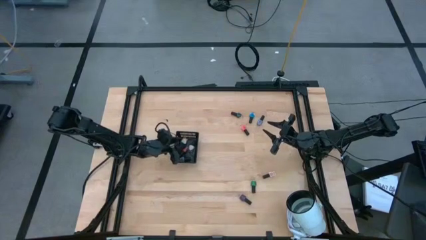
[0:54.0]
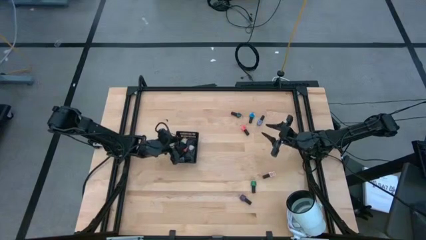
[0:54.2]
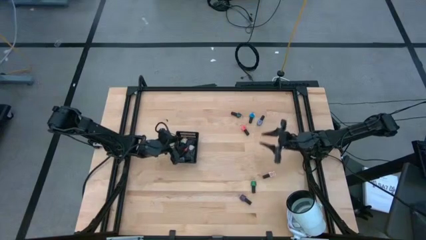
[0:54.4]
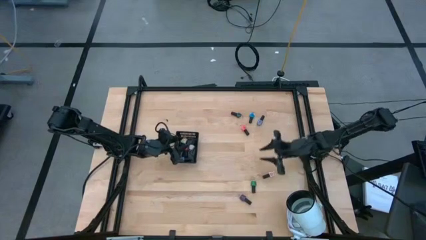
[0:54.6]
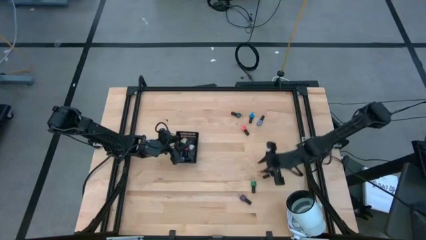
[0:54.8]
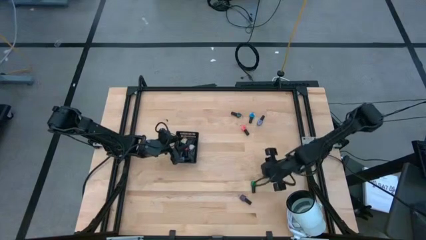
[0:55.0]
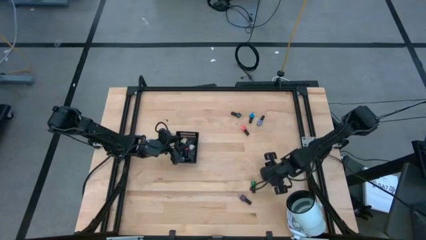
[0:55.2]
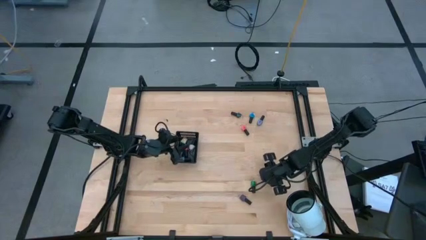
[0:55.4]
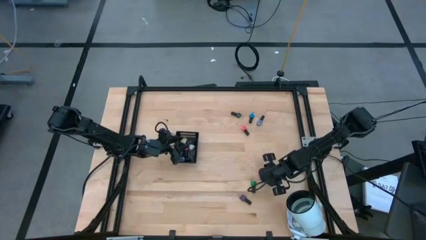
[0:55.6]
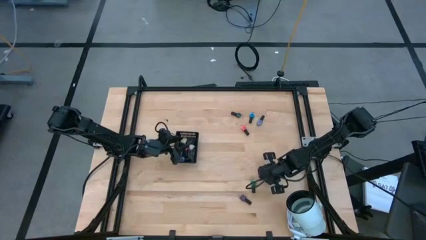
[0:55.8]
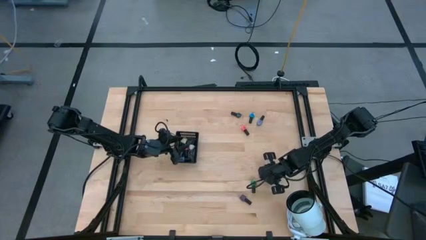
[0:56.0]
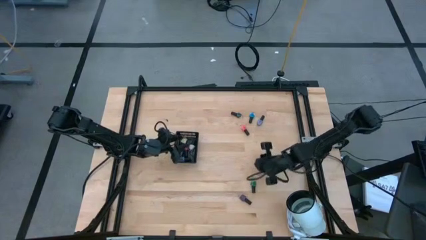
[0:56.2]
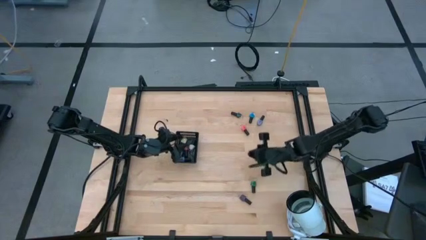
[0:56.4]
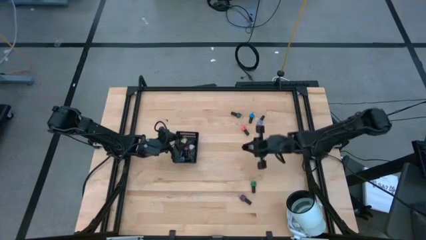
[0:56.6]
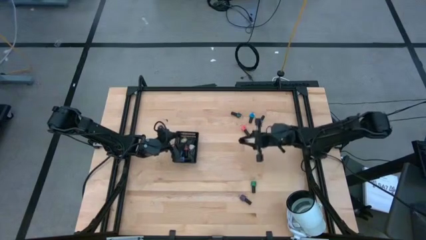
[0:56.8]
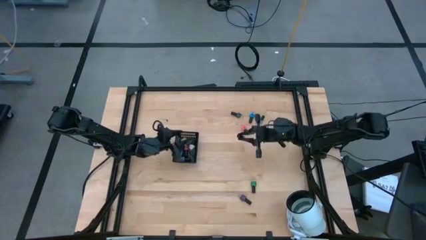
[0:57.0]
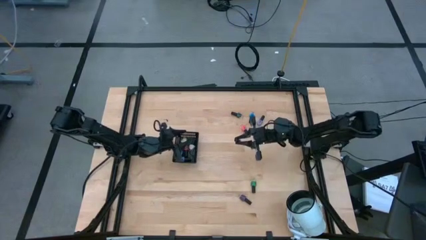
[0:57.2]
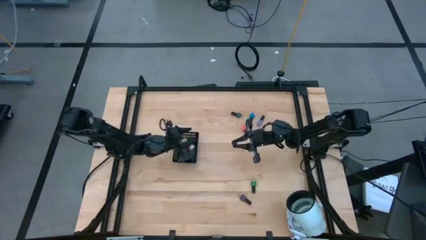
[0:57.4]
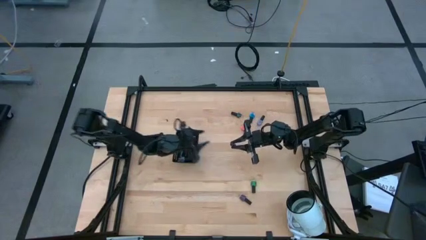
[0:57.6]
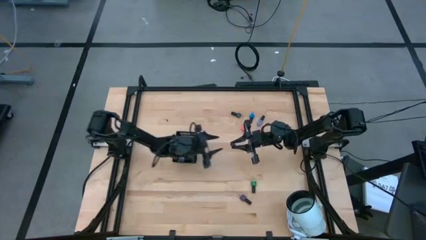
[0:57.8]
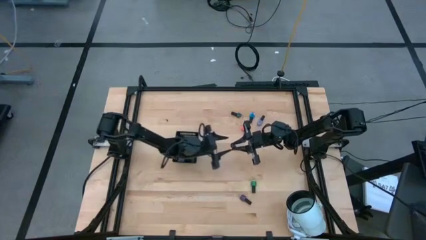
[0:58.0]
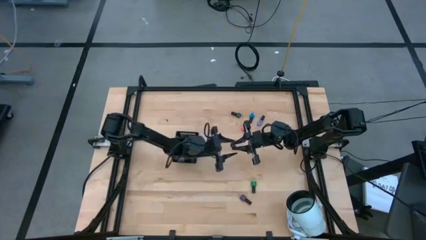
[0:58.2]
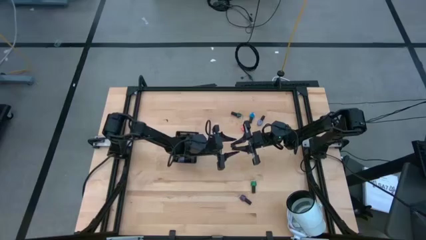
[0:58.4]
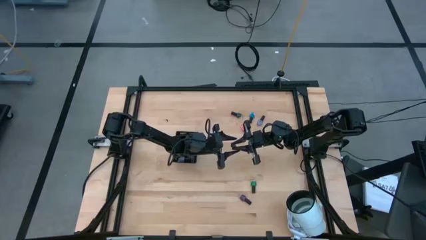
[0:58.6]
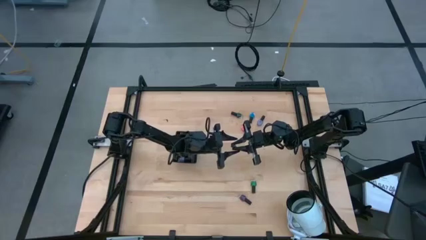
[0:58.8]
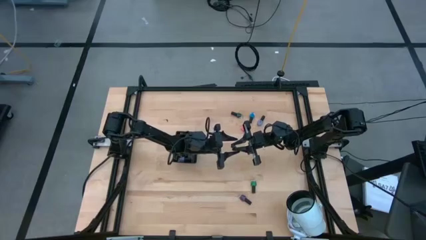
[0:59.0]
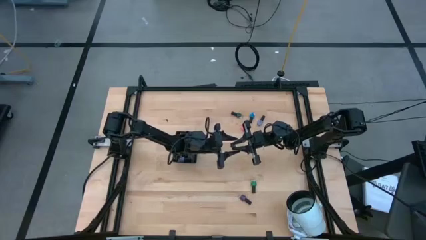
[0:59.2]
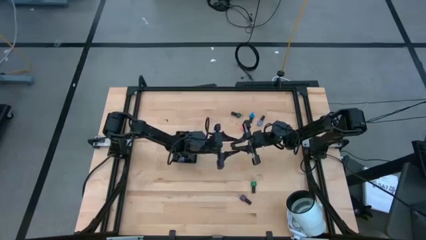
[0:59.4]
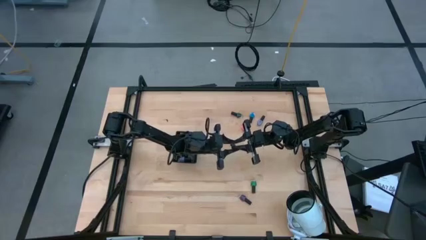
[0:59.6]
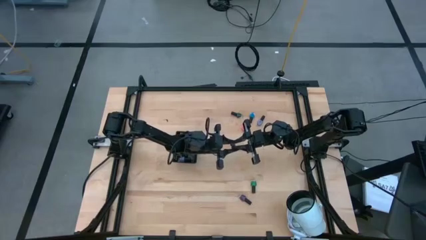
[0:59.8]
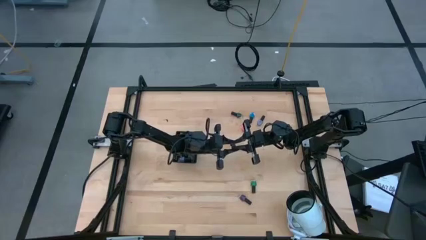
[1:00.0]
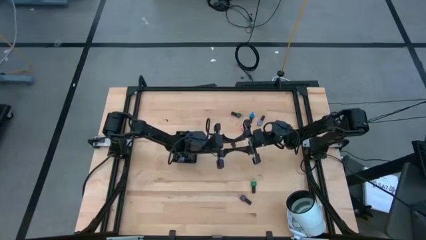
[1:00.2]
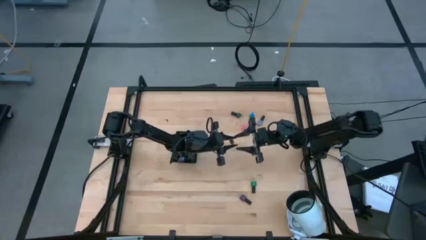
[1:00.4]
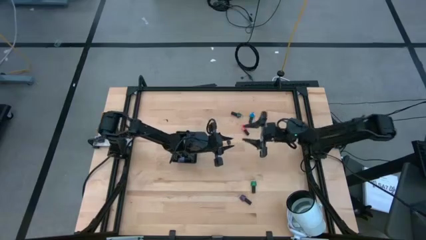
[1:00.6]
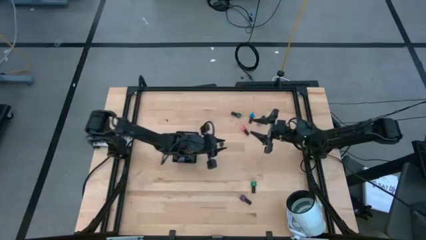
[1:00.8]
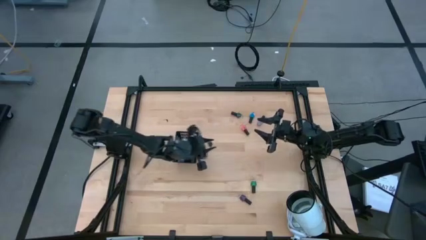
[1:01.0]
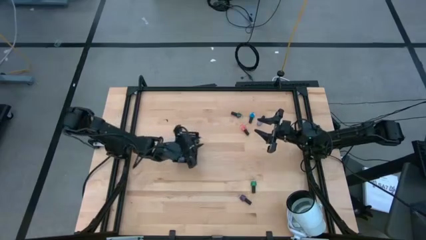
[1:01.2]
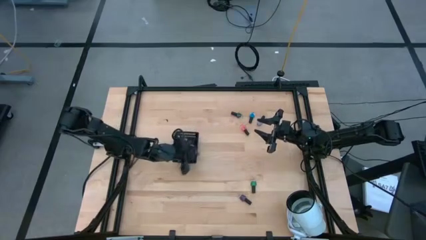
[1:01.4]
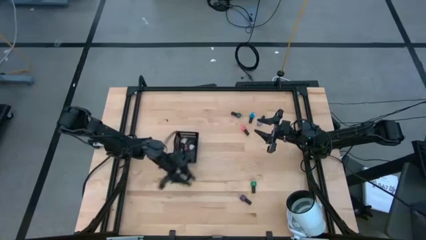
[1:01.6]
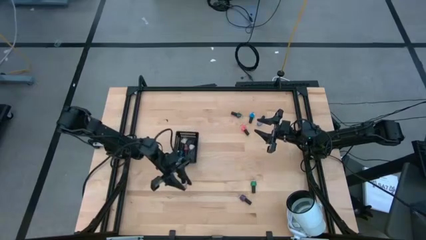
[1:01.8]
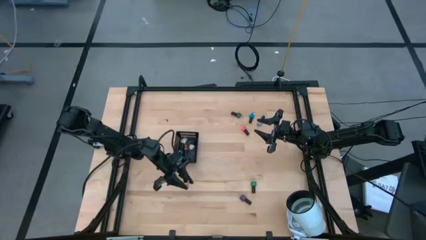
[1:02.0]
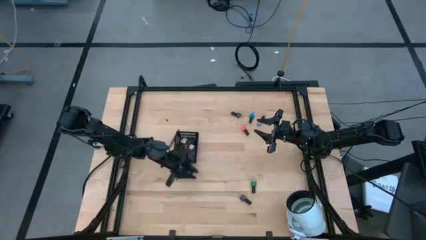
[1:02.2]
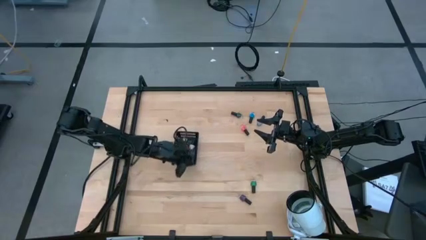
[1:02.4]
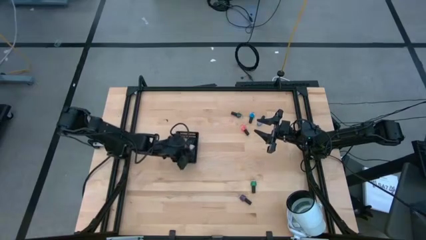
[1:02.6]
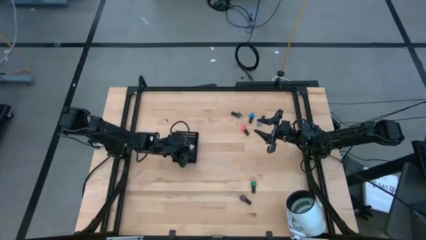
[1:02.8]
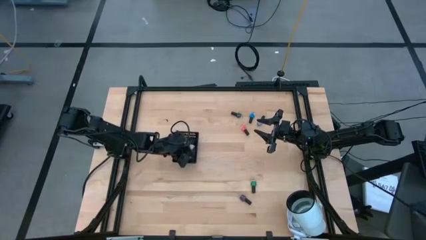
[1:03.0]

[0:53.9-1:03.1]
Task: Pick & Place Nail Polish
Put the brown nail polish into the basket
